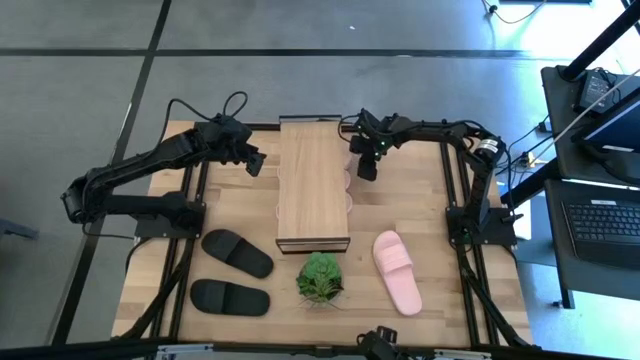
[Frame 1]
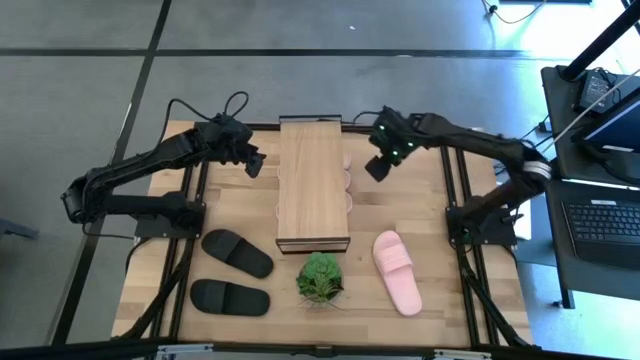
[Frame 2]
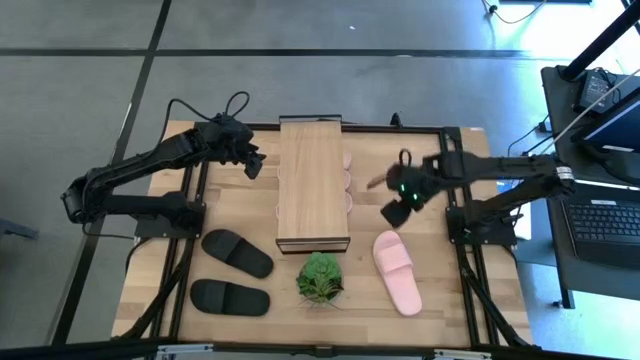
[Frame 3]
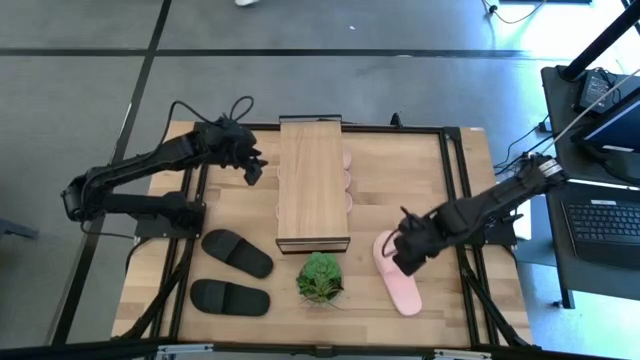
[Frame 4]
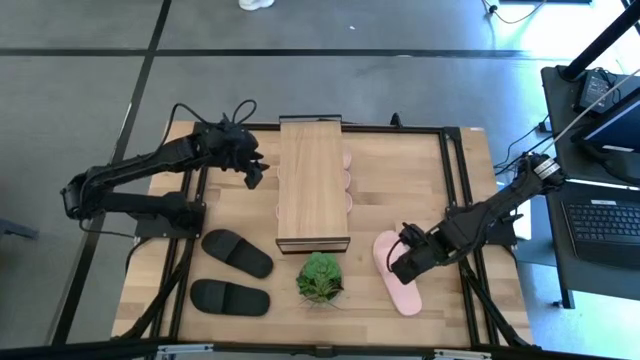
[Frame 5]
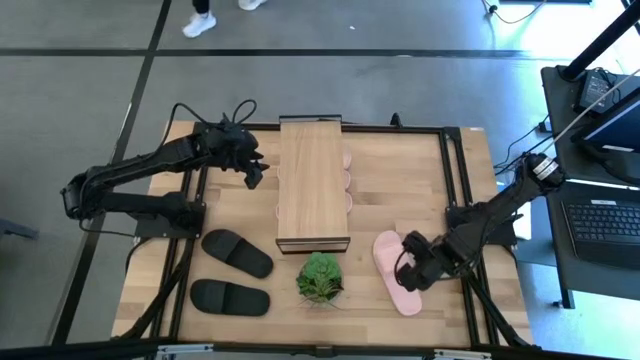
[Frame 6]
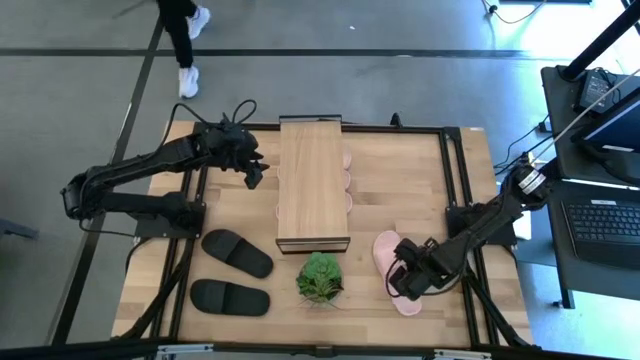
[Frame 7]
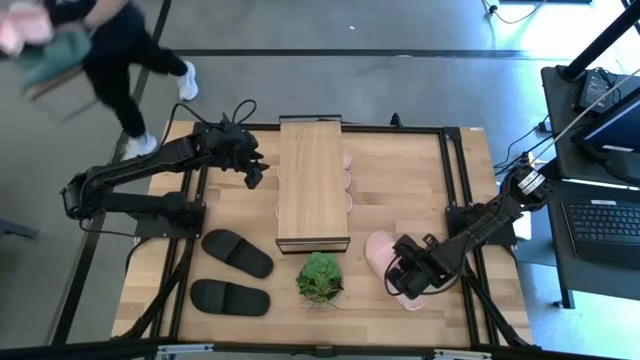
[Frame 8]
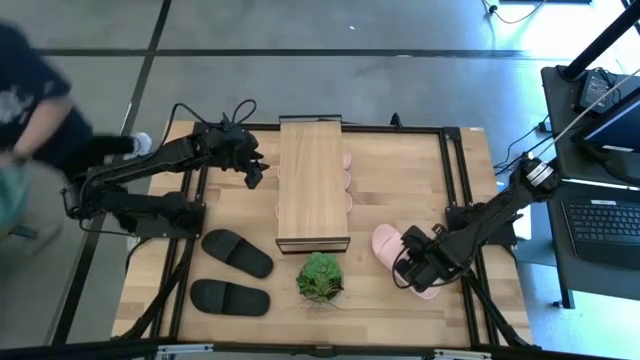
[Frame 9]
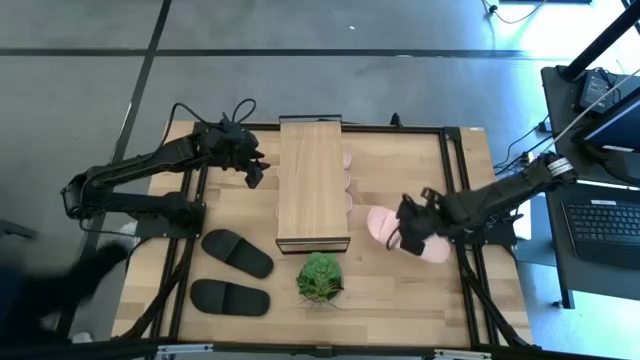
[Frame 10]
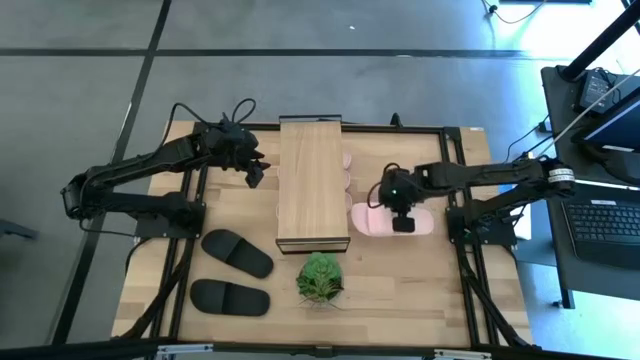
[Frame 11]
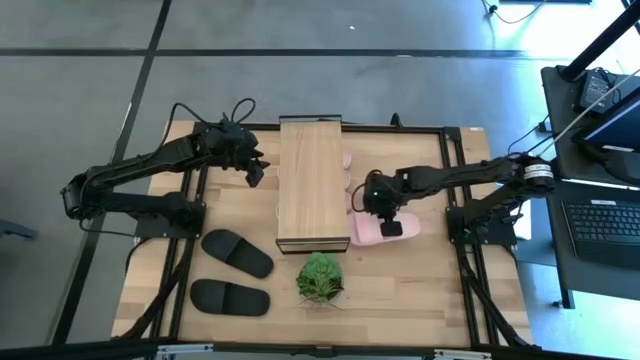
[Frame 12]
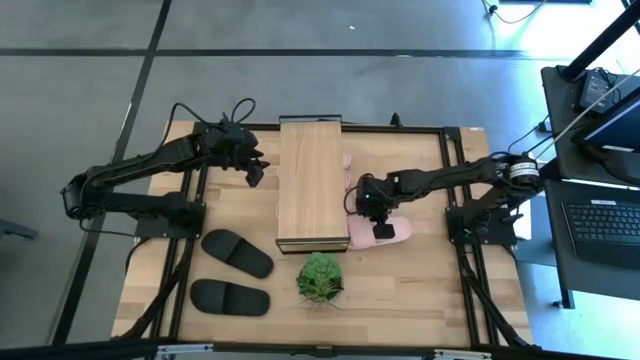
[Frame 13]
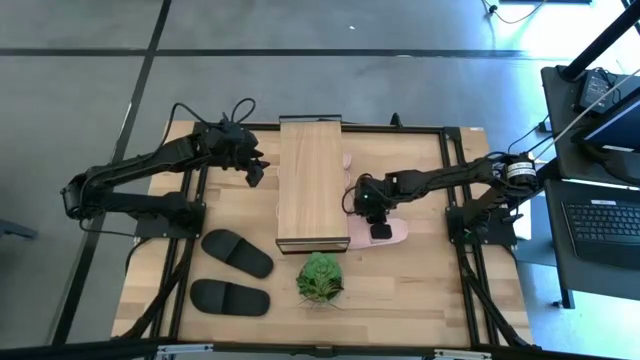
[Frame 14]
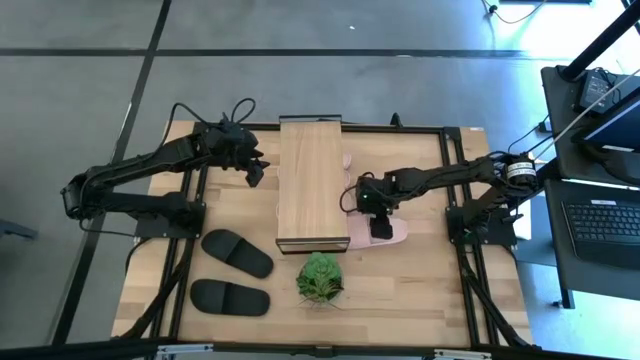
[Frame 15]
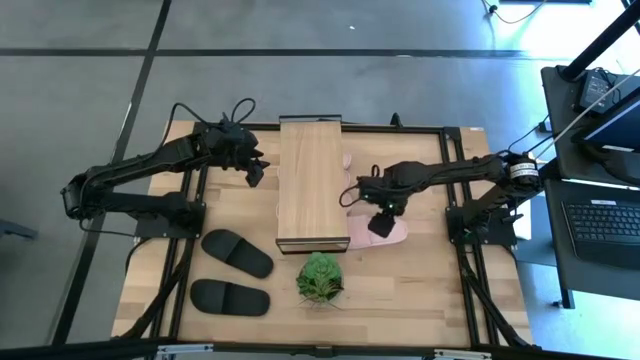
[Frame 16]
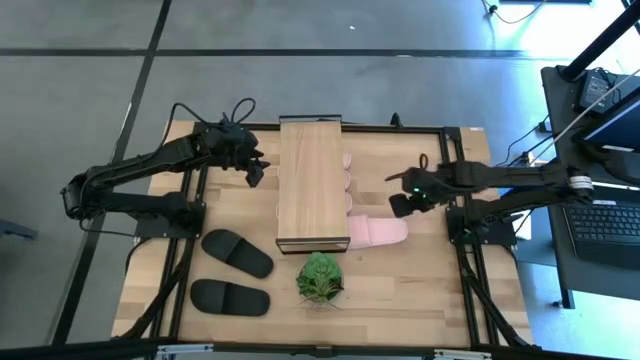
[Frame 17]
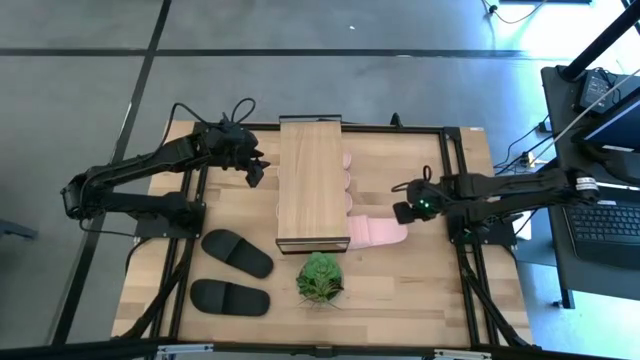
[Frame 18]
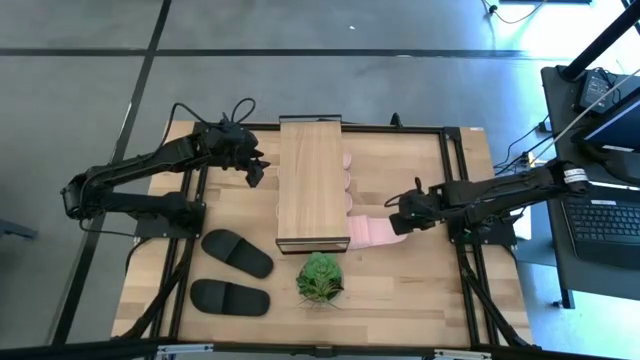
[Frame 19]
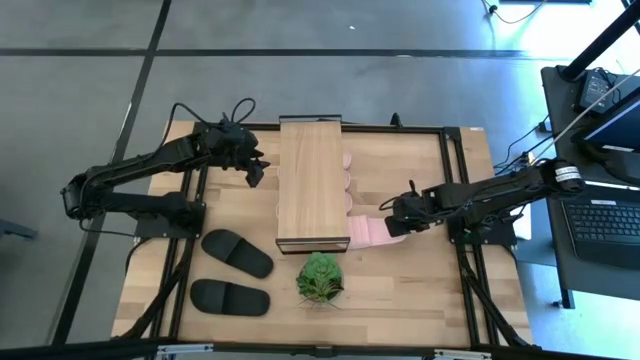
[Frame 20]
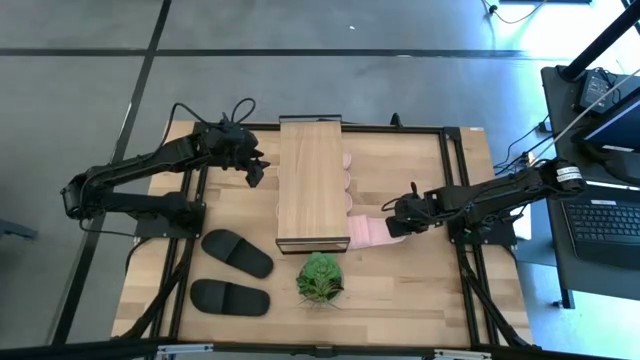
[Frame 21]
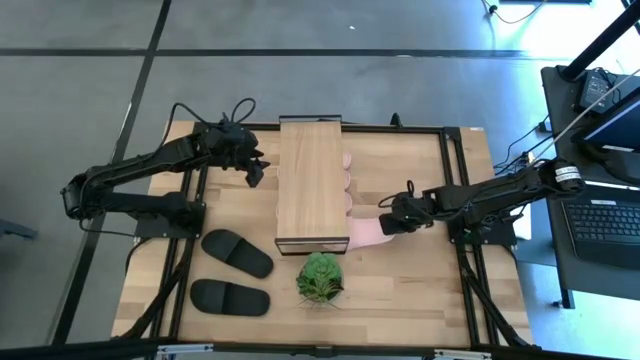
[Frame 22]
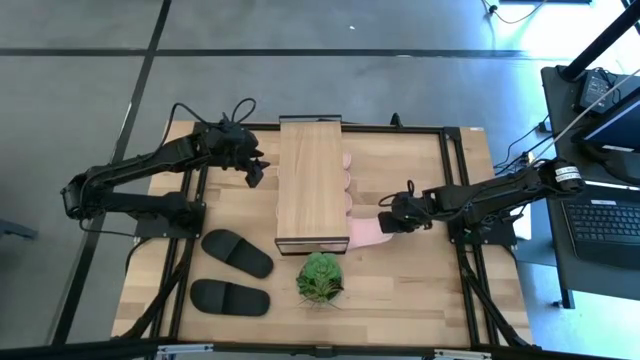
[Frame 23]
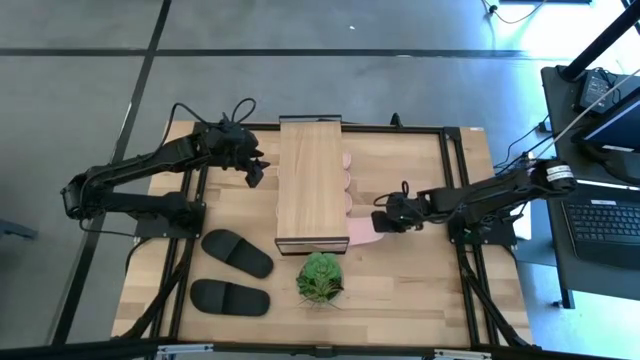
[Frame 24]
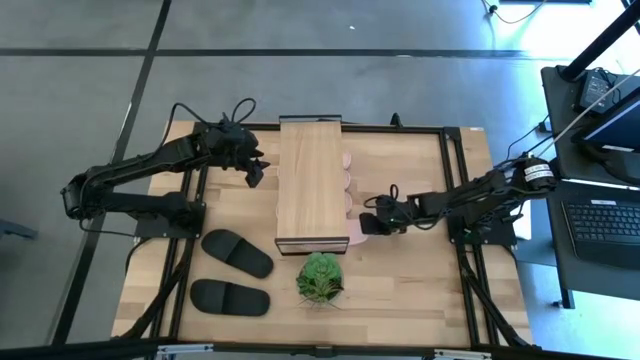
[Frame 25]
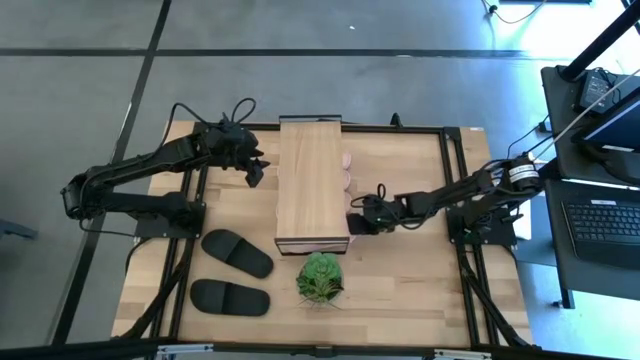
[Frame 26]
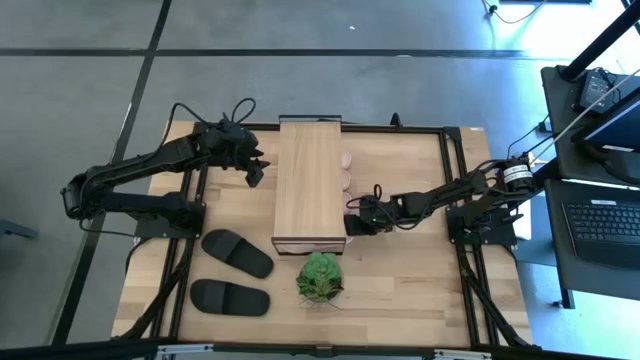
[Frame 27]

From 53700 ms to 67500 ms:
Task: Pick and place slides into the shelf
Put the pink slipper under the shelf
